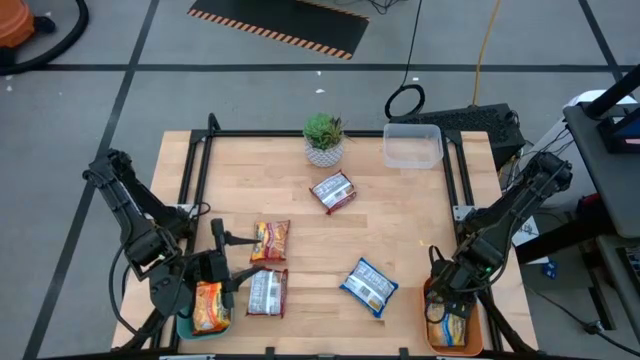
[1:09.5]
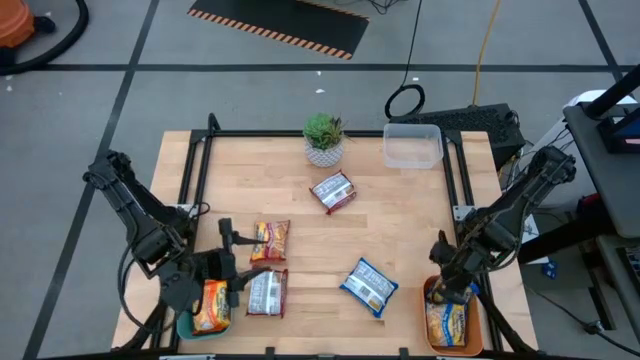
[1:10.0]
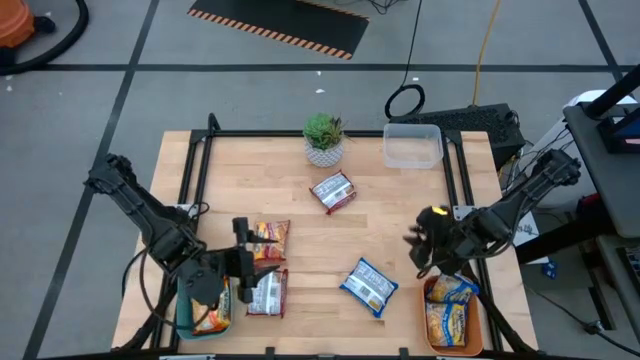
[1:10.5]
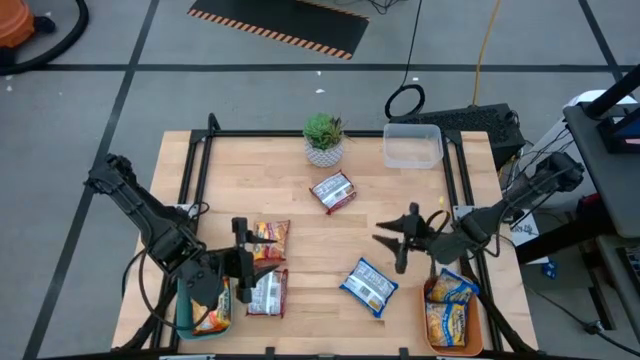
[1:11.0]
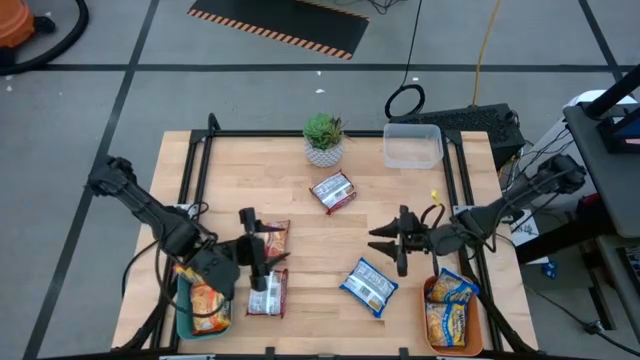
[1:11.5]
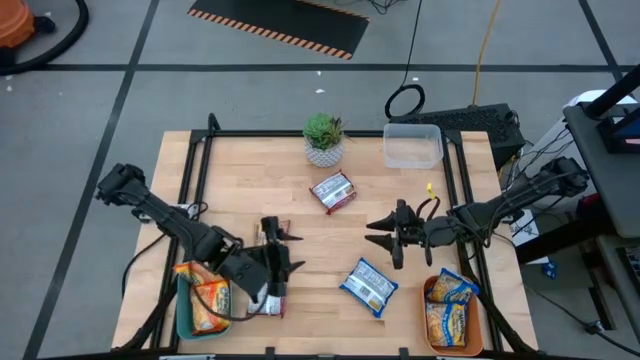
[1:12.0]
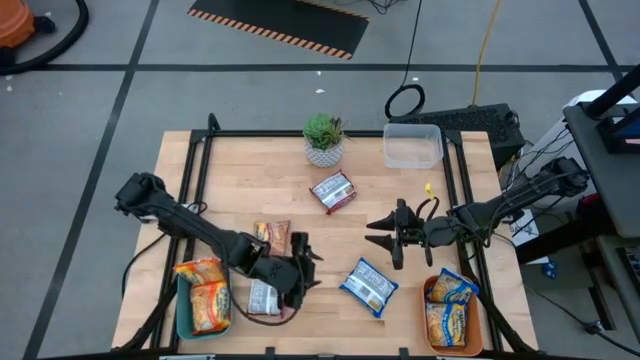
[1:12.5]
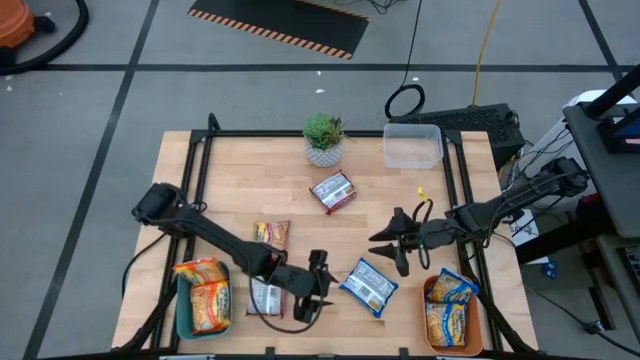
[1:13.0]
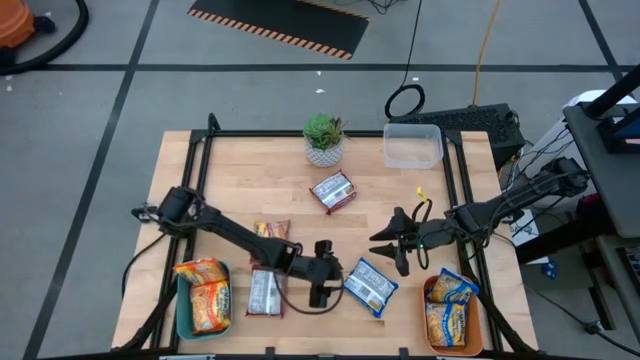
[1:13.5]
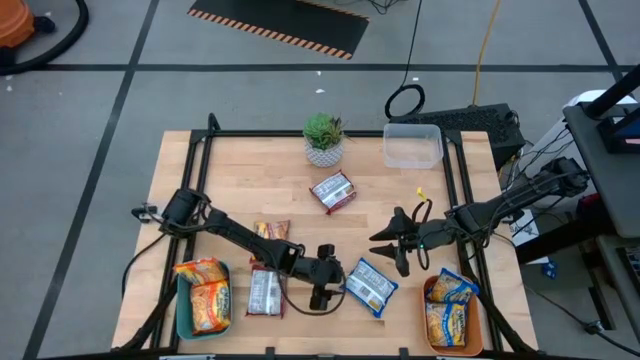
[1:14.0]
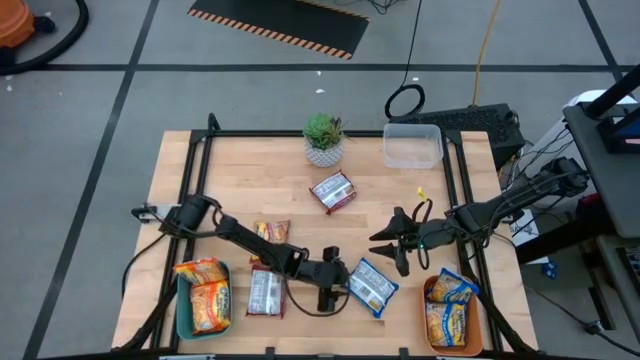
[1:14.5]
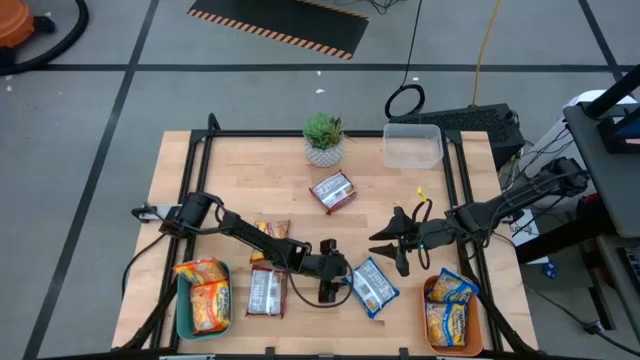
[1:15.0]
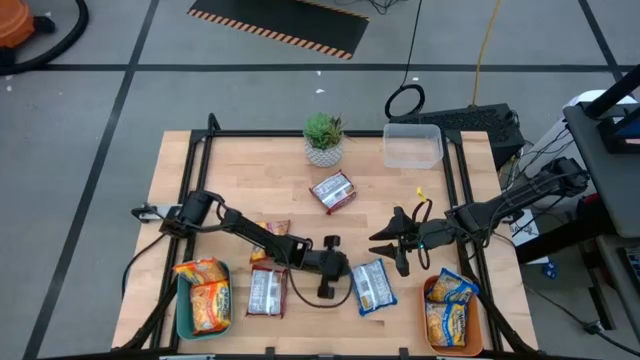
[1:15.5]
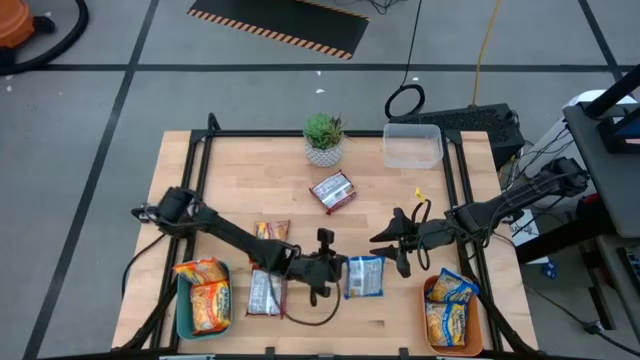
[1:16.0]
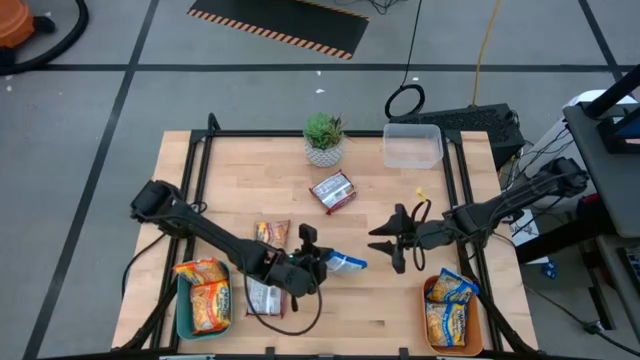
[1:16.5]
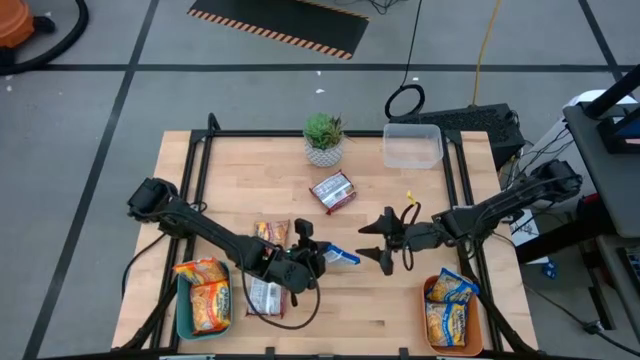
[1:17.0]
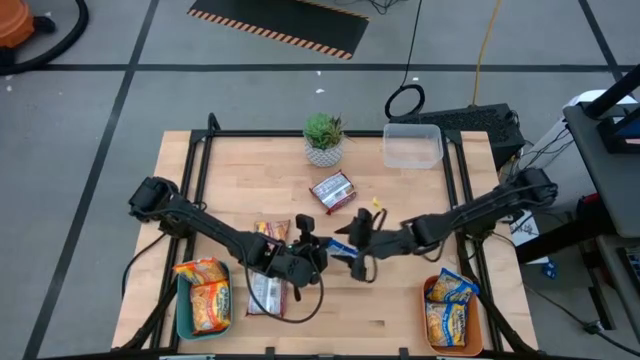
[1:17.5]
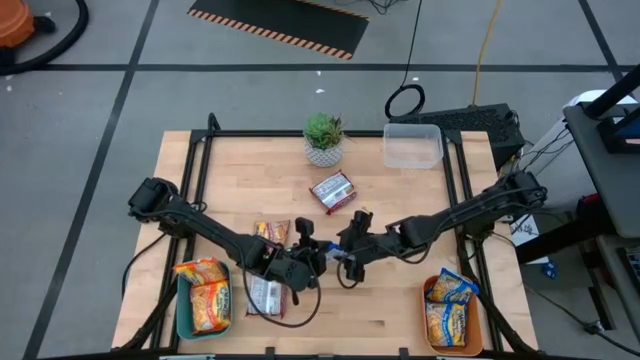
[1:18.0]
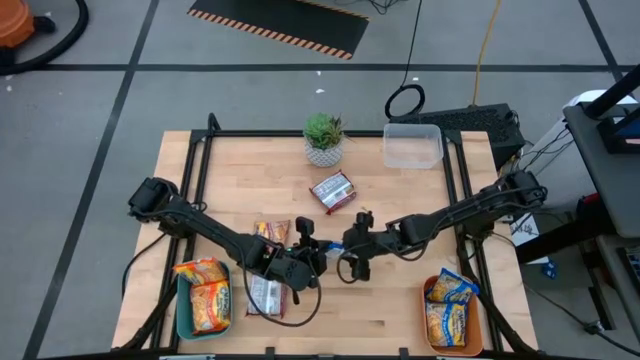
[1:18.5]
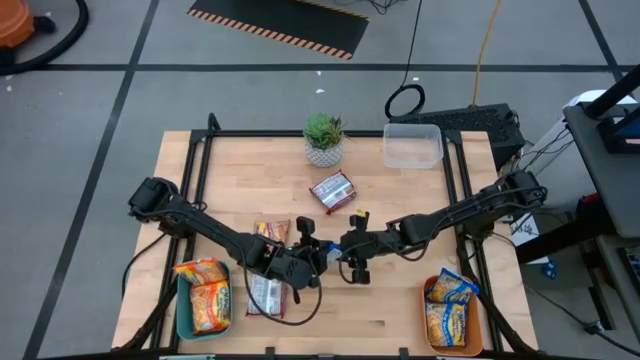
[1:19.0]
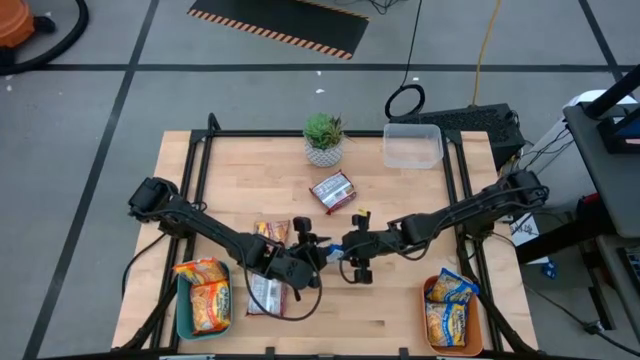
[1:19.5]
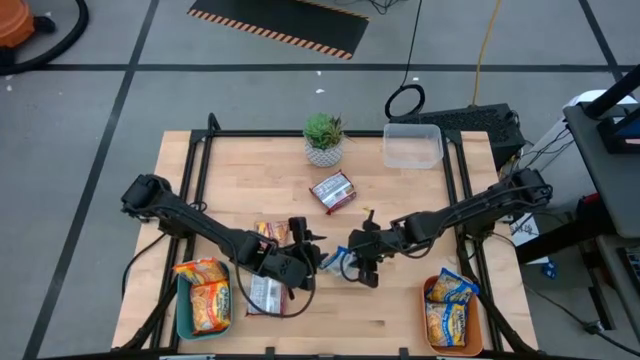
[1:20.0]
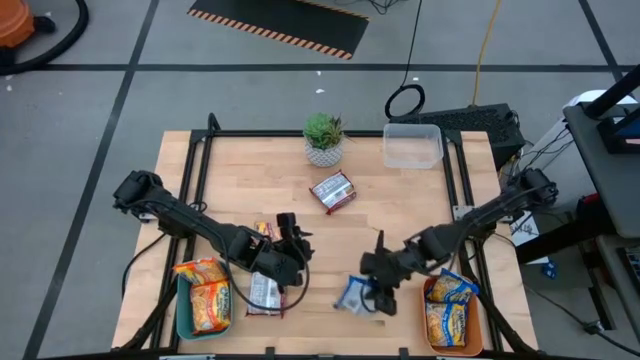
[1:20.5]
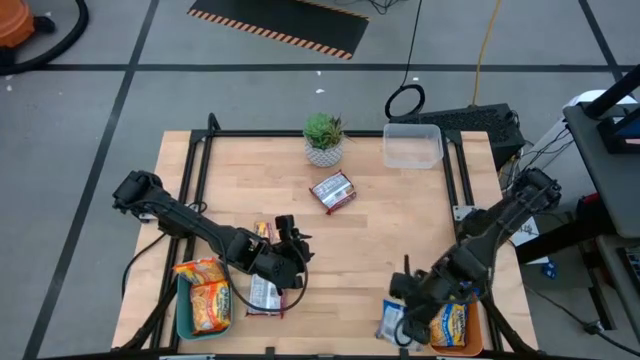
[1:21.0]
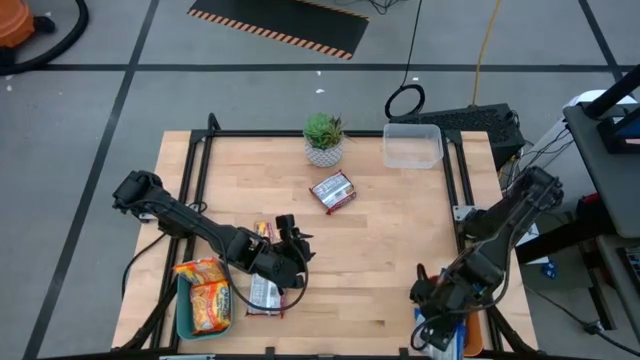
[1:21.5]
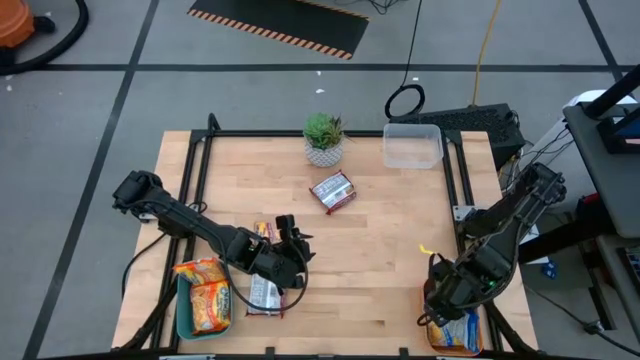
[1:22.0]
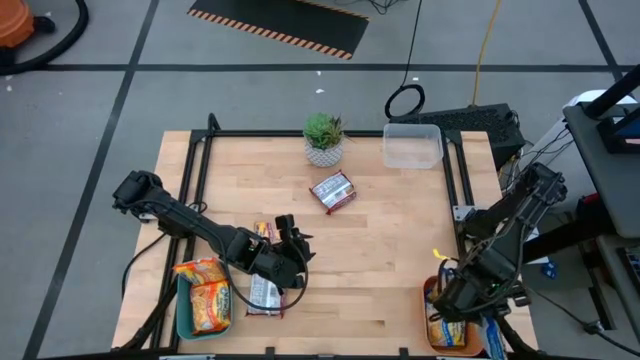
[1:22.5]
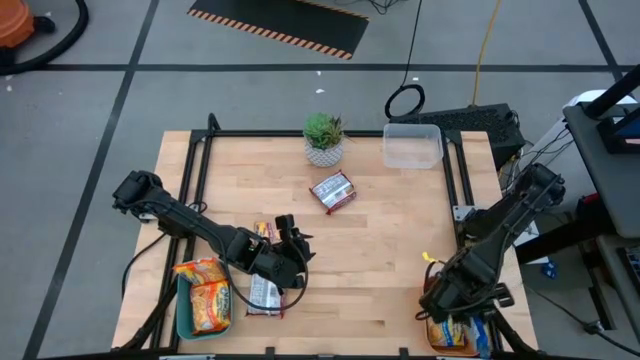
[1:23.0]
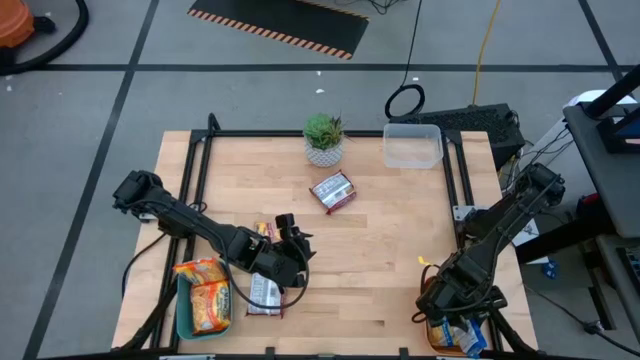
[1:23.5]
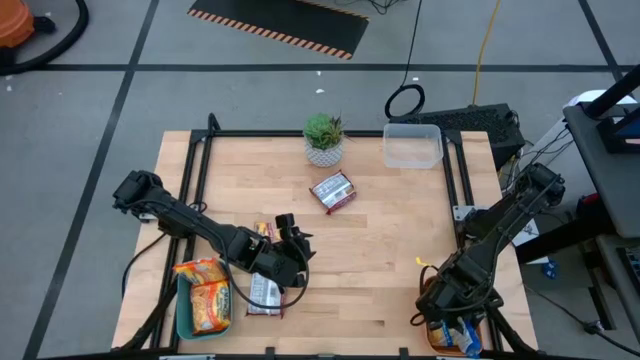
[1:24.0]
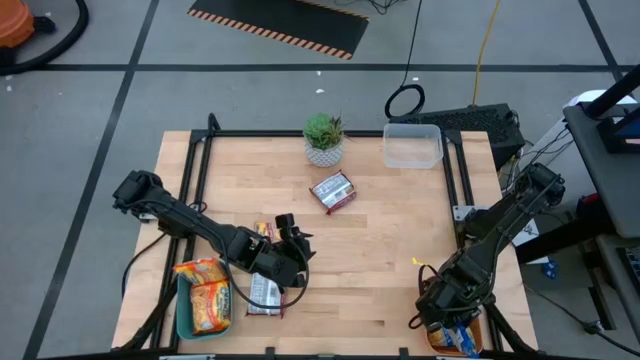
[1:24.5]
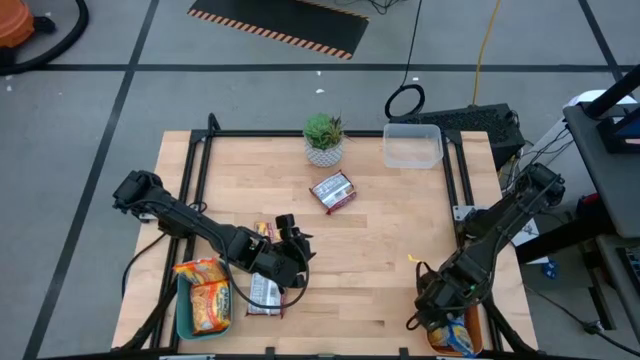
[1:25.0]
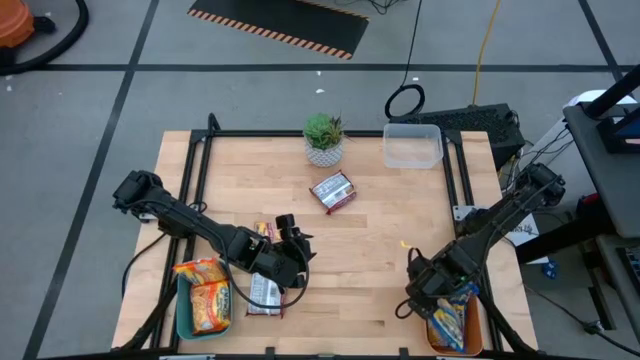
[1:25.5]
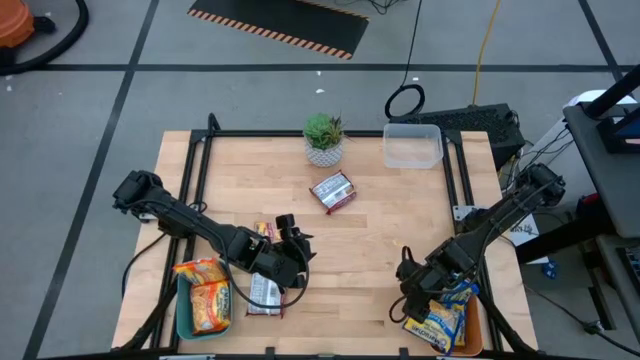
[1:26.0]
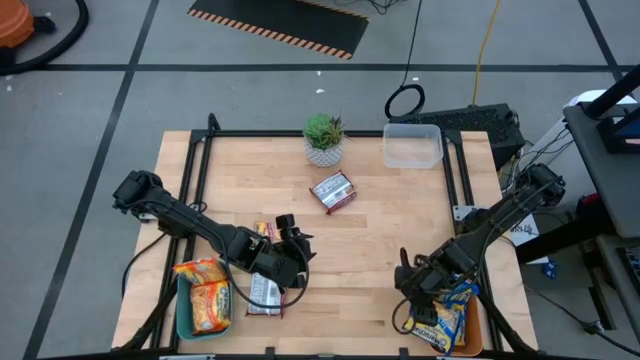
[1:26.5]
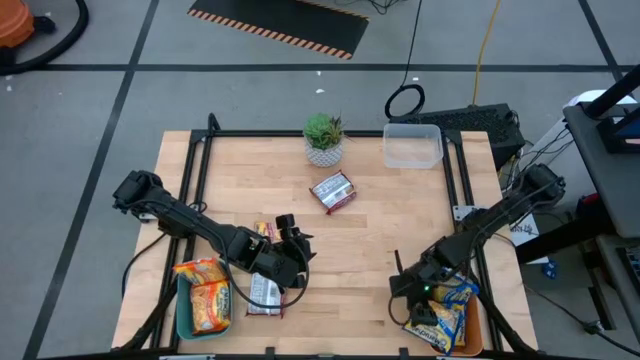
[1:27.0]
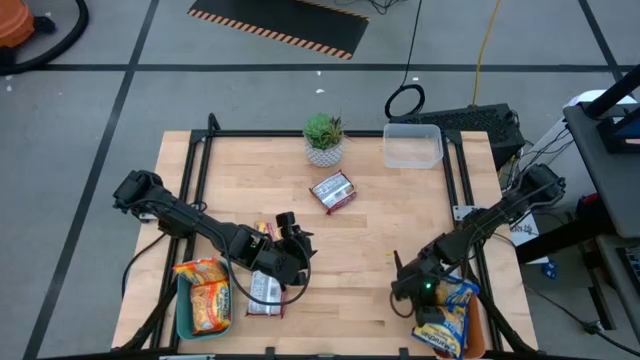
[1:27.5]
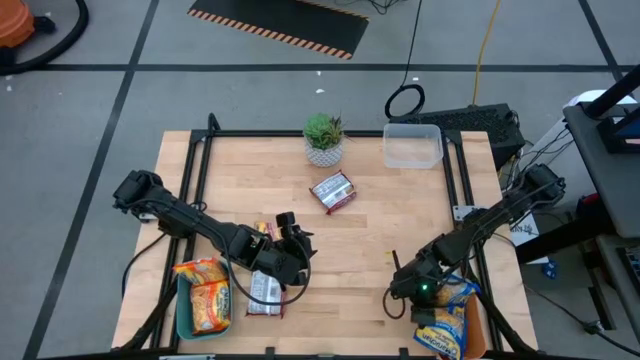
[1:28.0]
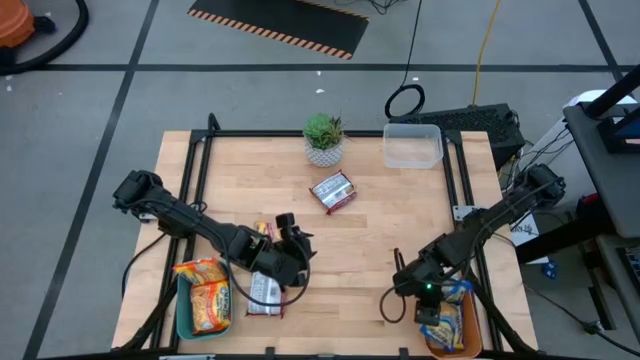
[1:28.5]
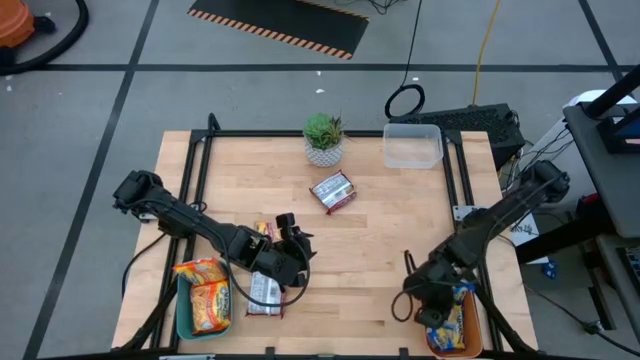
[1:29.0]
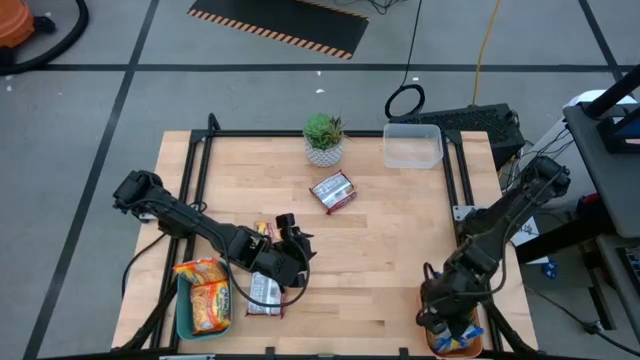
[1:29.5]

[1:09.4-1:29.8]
Task: Sort Maruchan noodles
Put the blue noodle pack into the orange bin

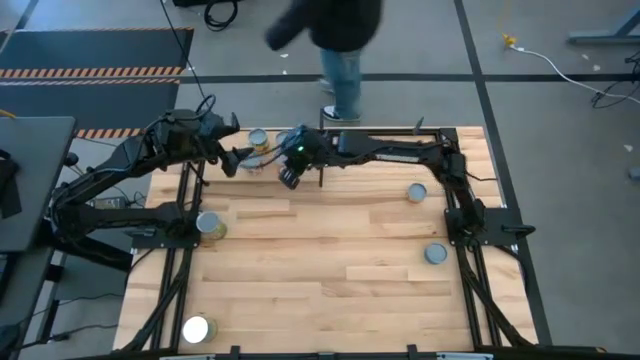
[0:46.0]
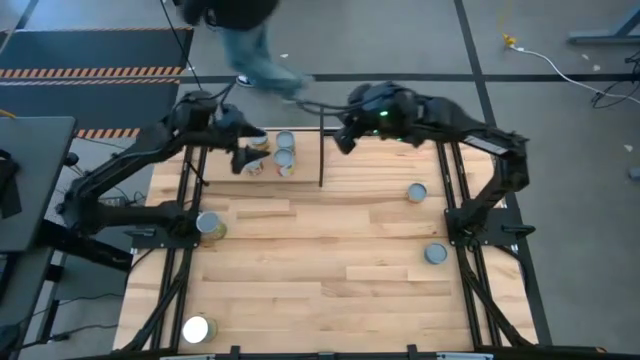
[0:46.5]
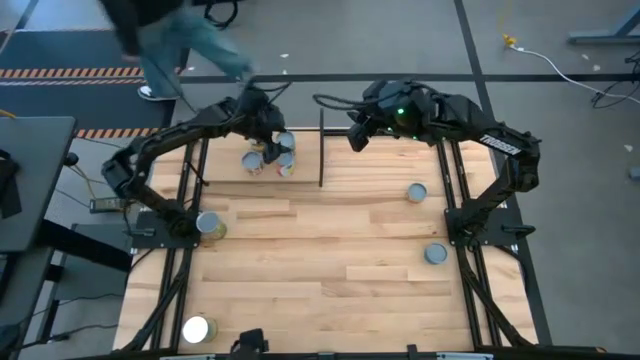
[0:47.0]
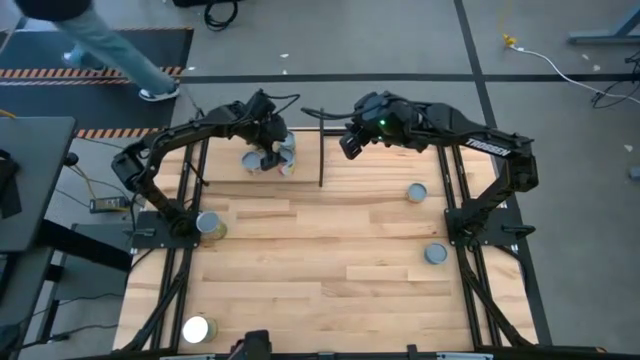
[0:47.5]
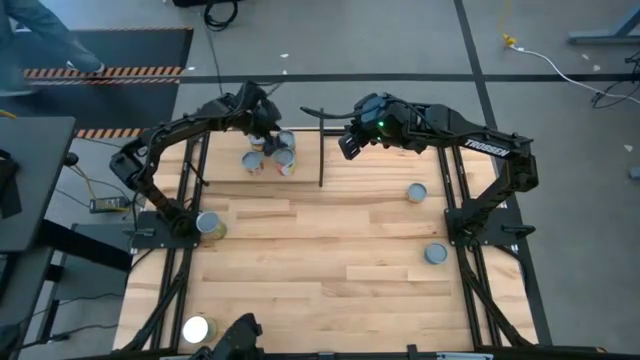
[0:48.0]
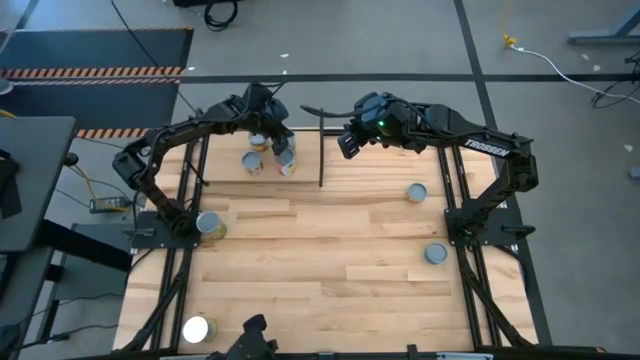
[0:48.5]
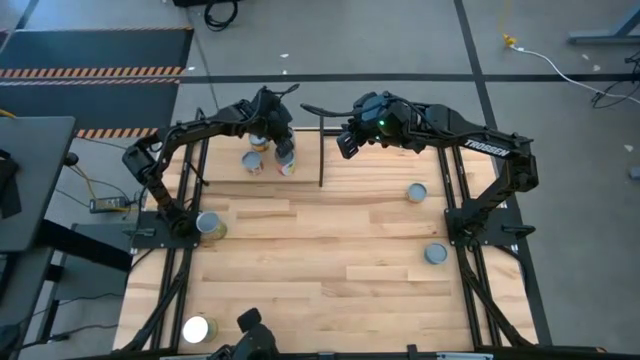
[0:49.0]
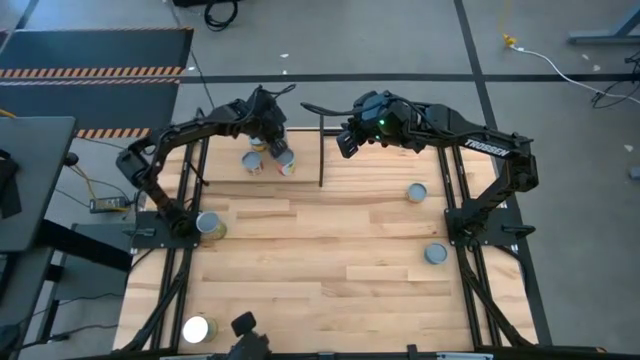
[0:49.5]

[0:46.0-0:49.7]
Task: Pick and place cans onto a shelf
Adjust the canned spaghetti sauce on the shelf
